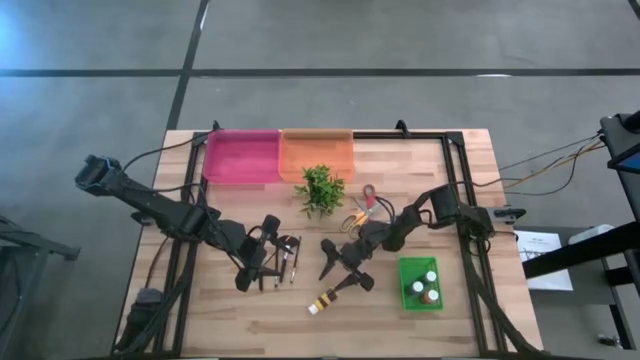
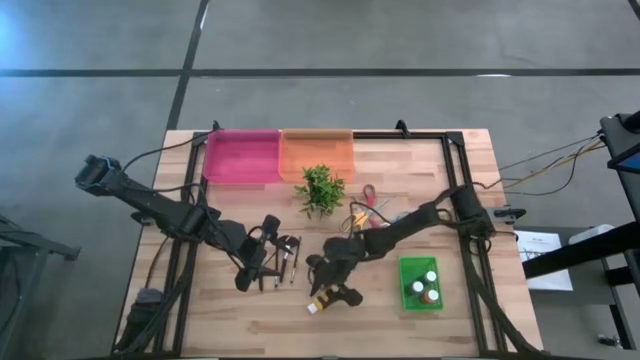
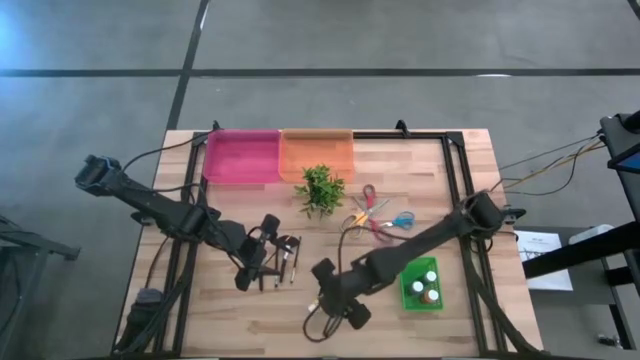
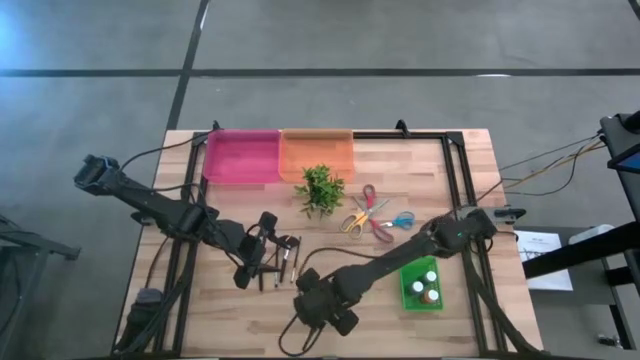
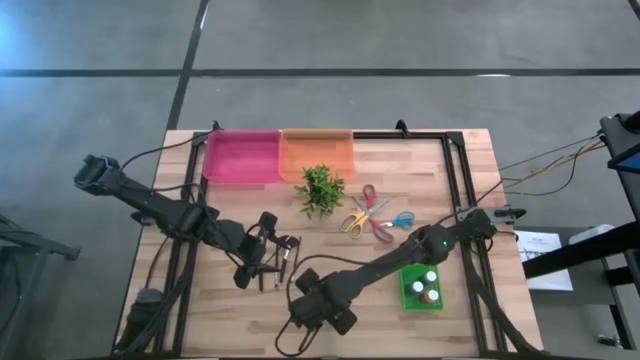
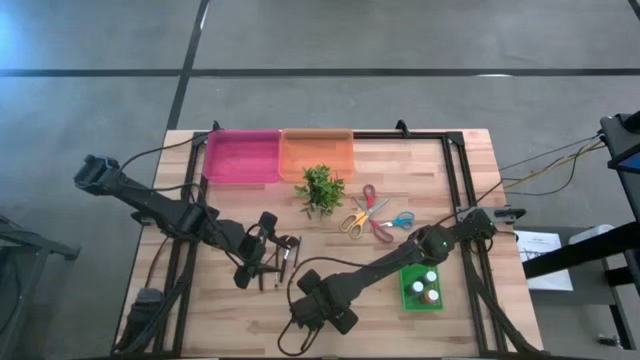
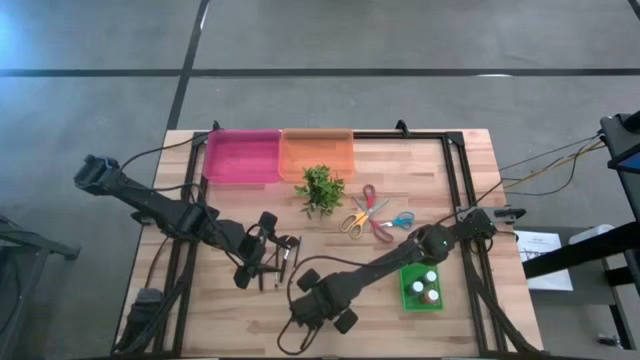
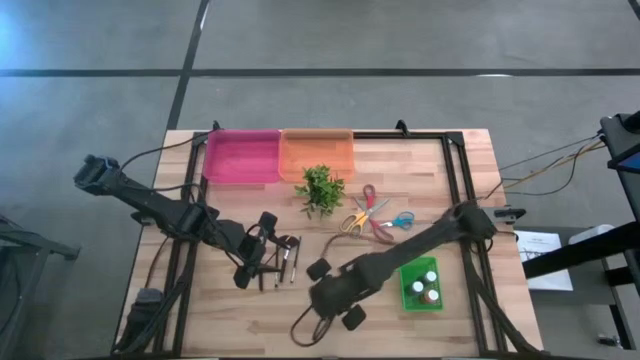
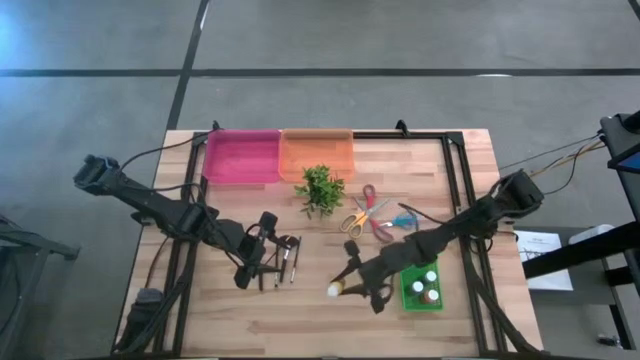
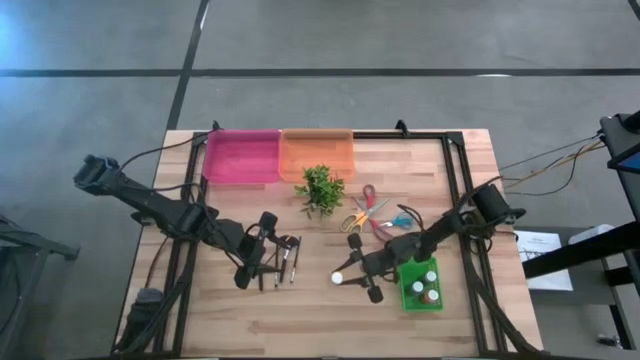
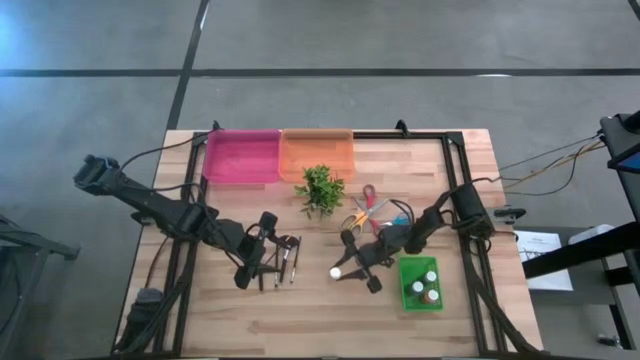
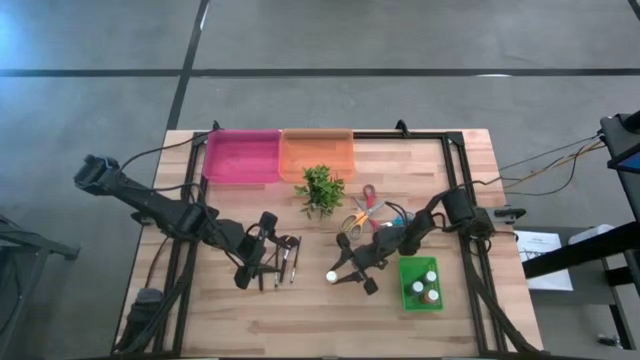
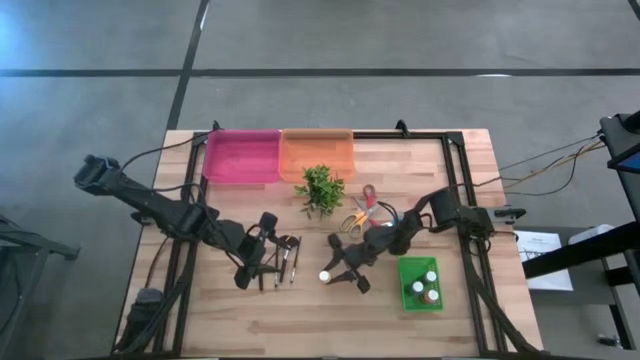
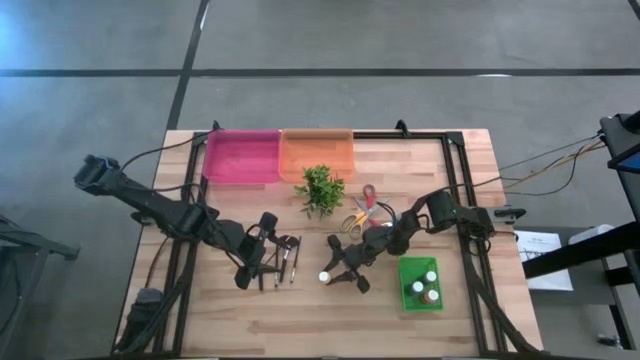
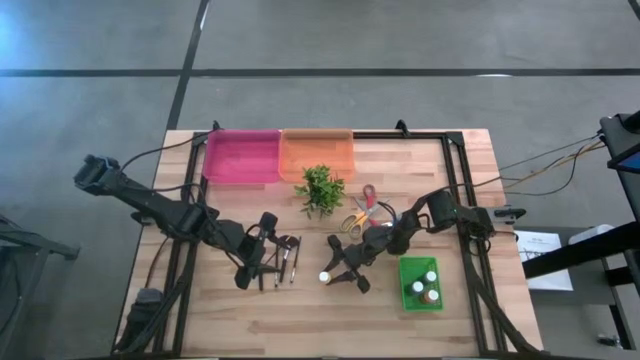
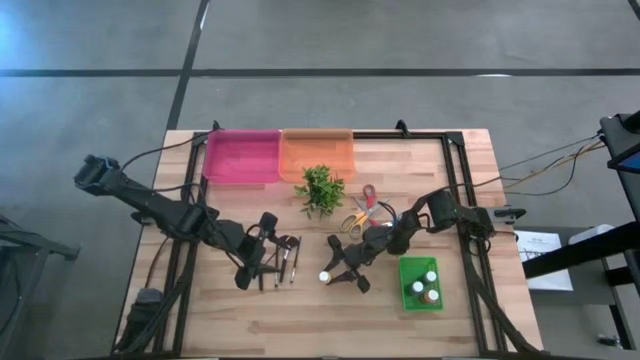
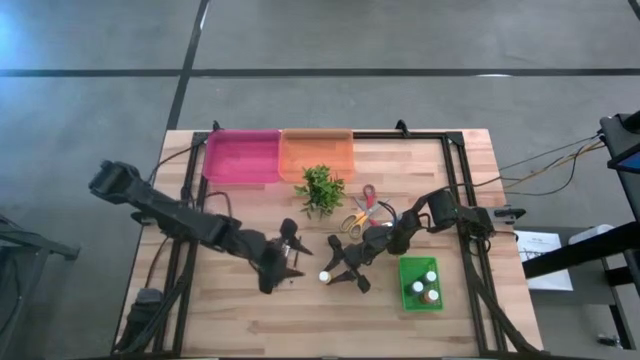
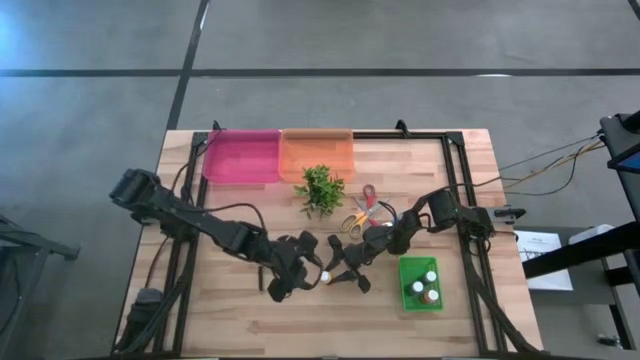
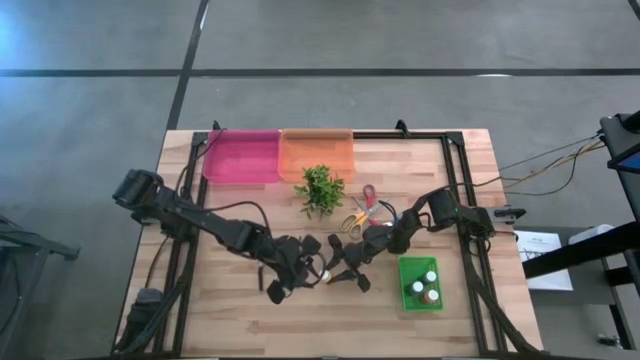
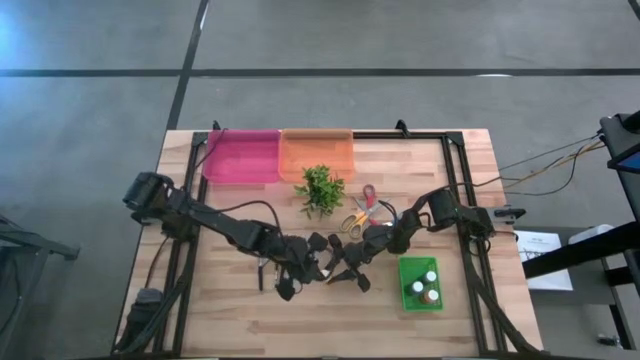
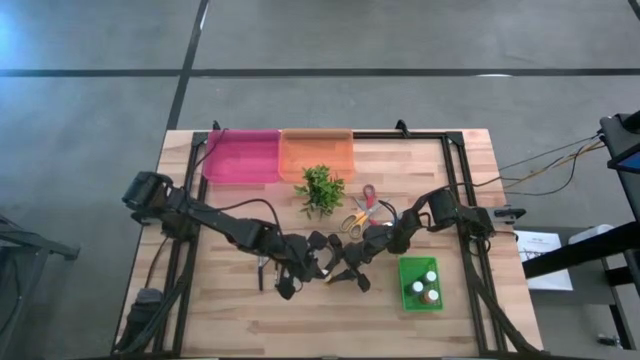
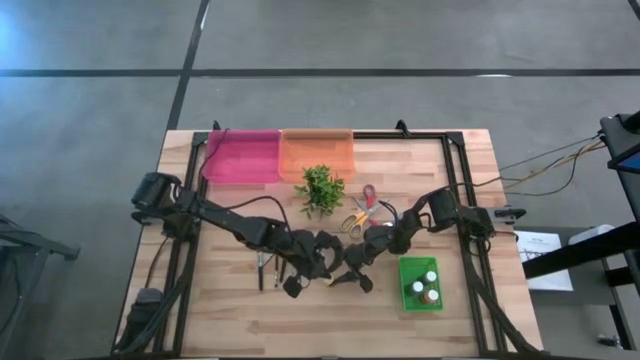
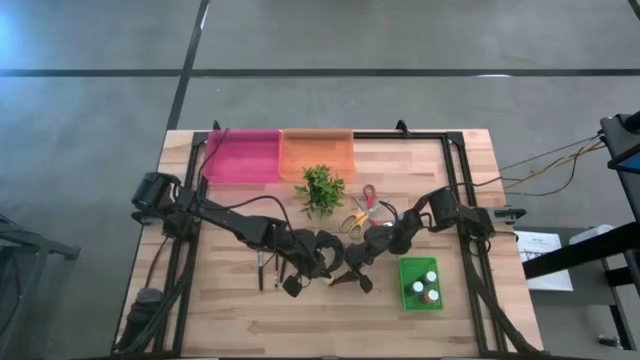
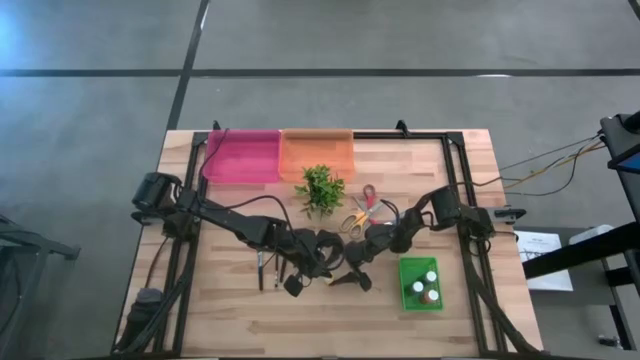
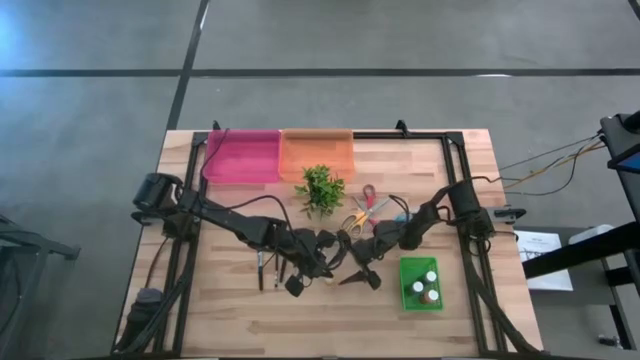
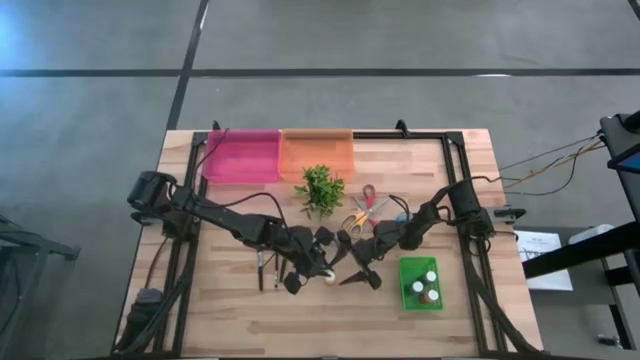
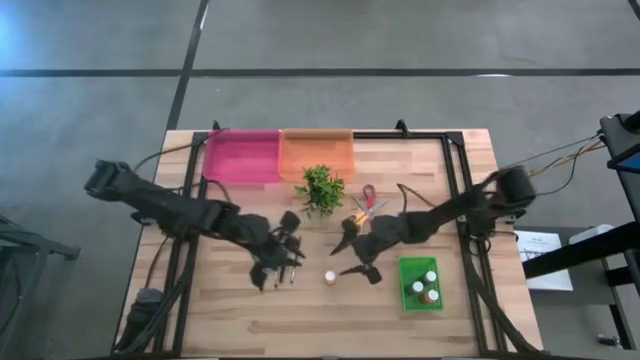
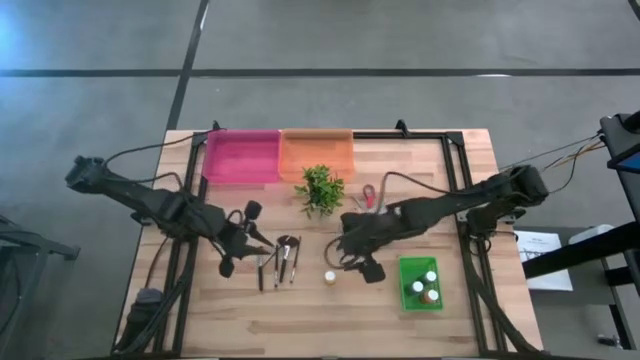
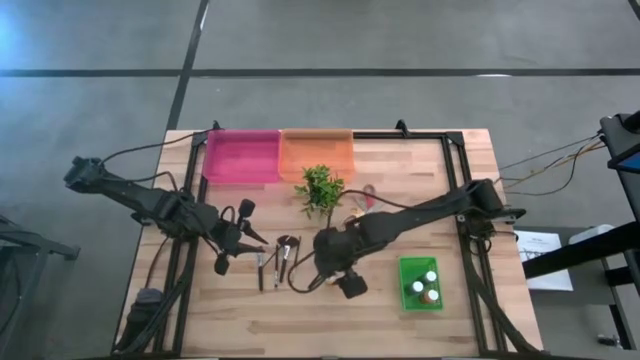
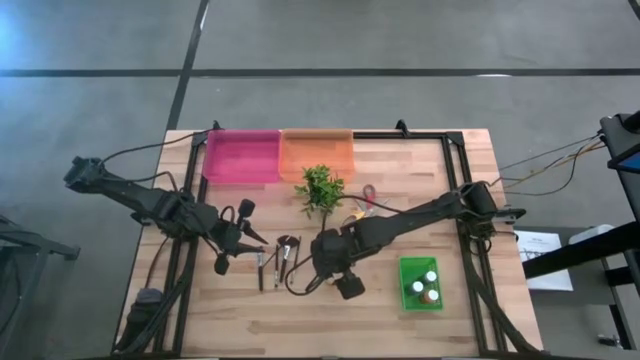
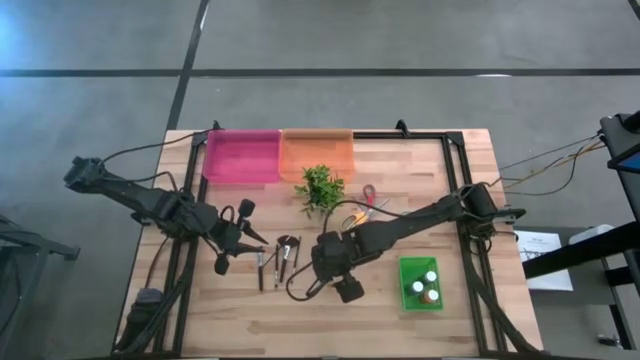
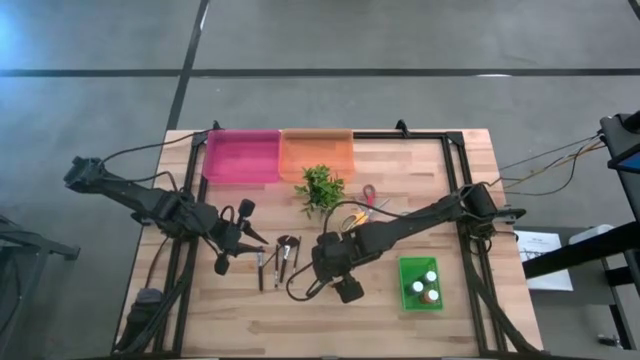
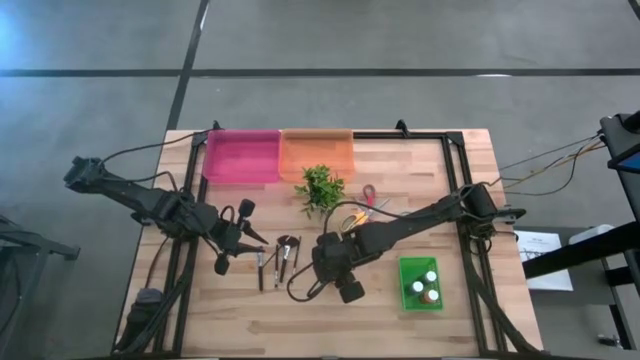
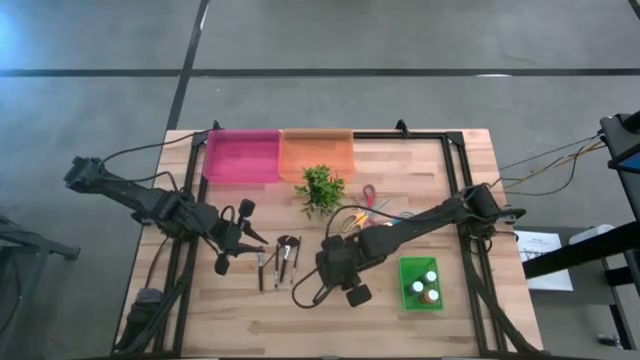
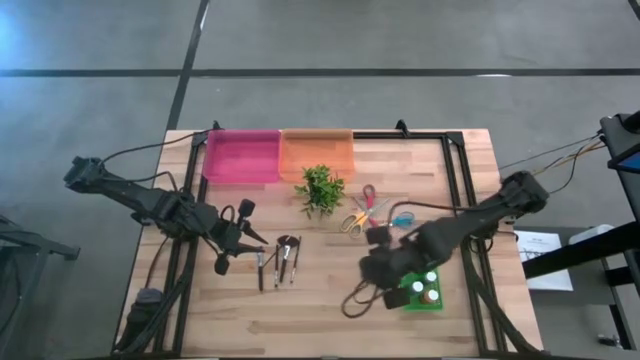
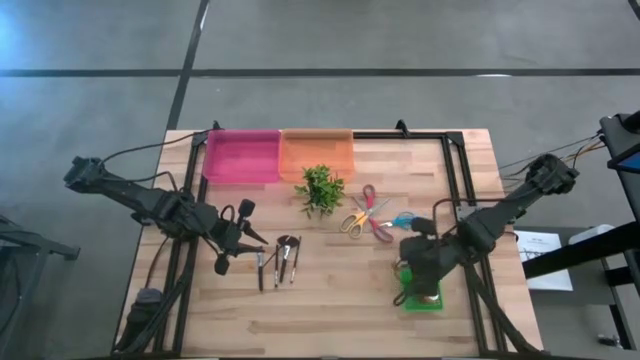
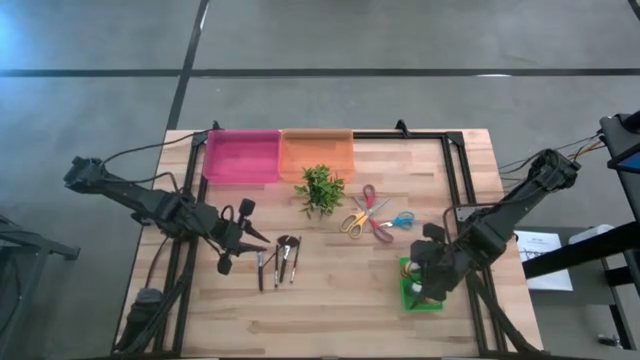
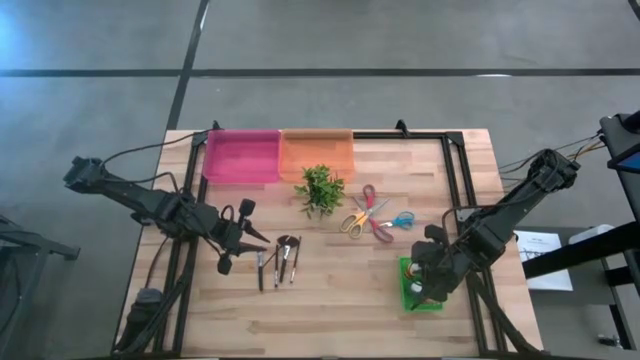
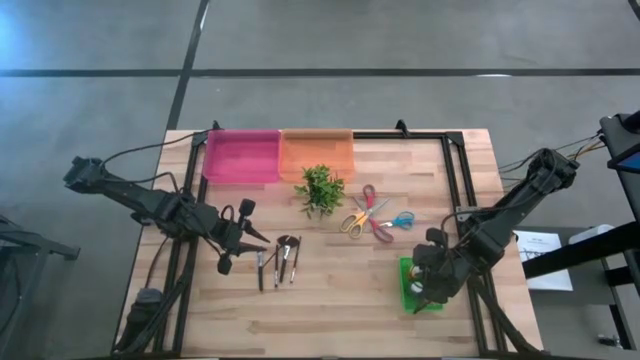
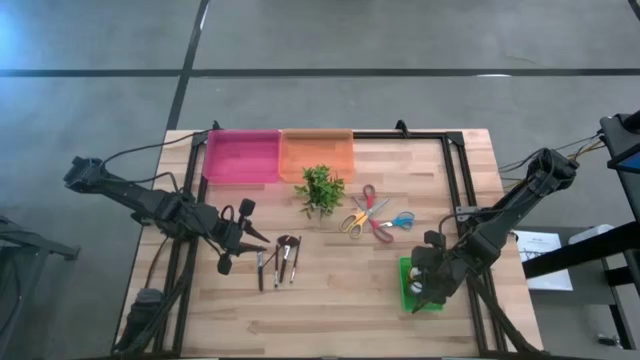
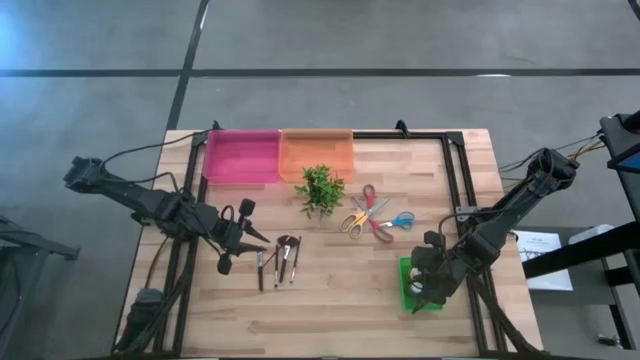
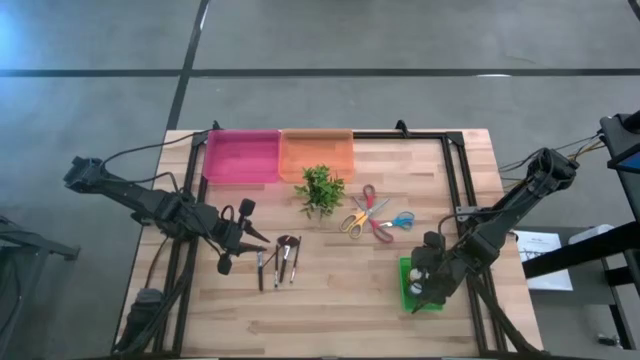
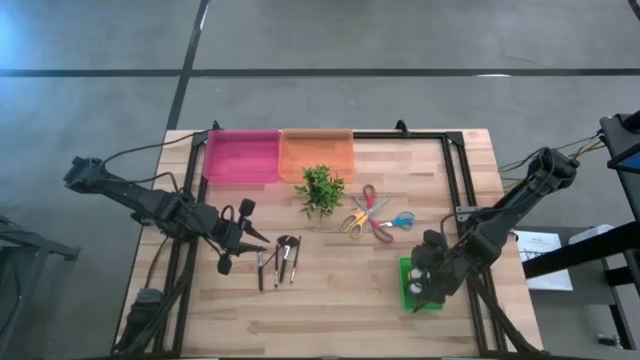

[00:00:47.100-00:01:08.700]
Task: Pick & Place Paint Supplies
Put the yellow paint bottle into the green bin
